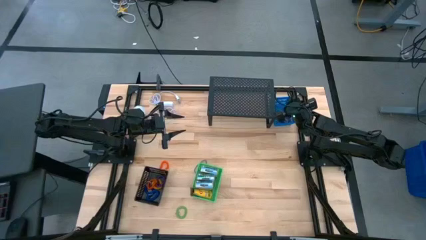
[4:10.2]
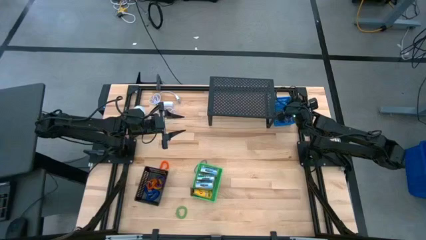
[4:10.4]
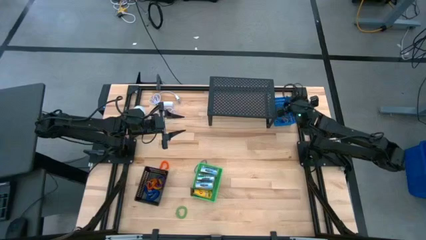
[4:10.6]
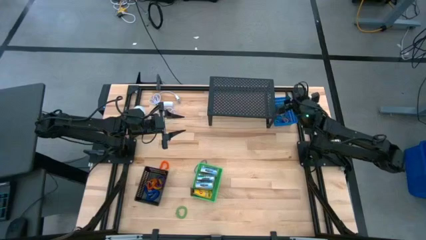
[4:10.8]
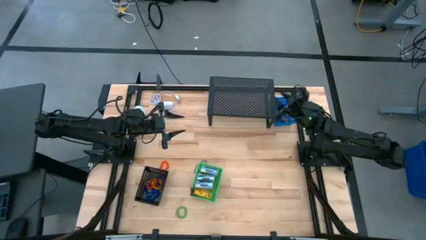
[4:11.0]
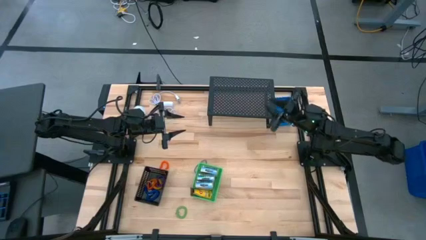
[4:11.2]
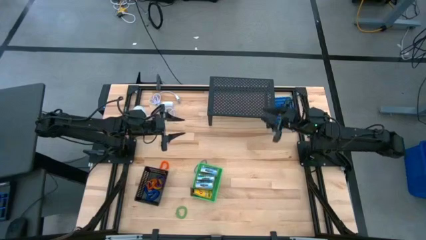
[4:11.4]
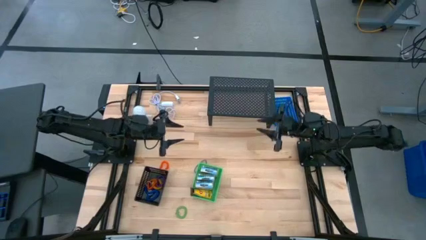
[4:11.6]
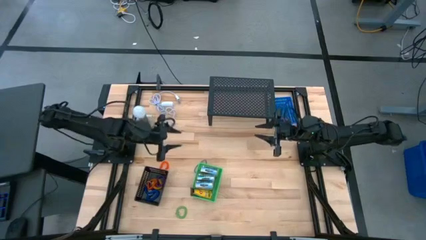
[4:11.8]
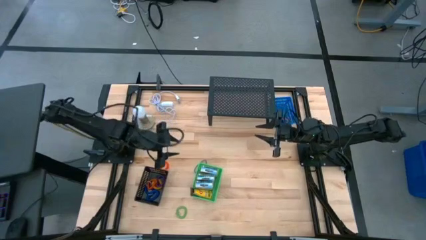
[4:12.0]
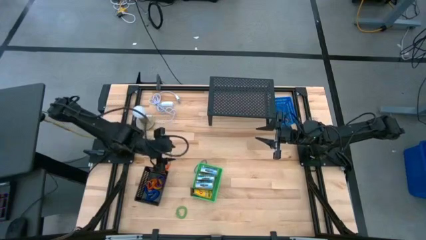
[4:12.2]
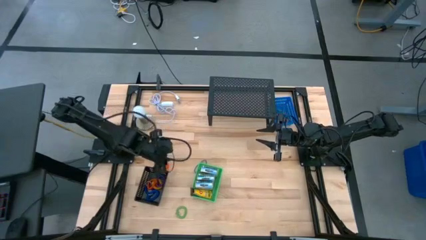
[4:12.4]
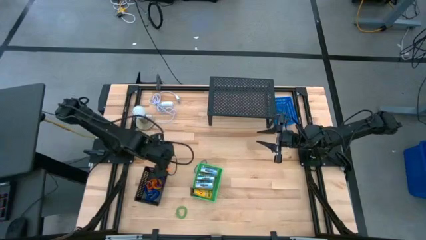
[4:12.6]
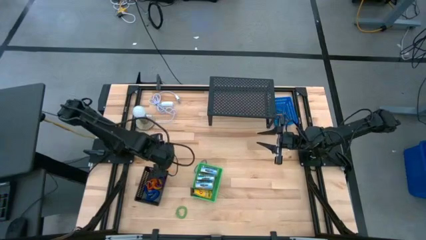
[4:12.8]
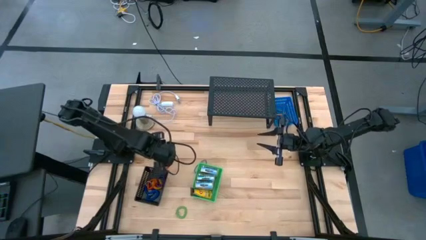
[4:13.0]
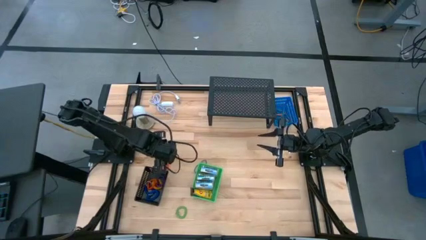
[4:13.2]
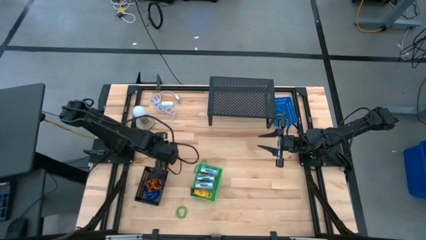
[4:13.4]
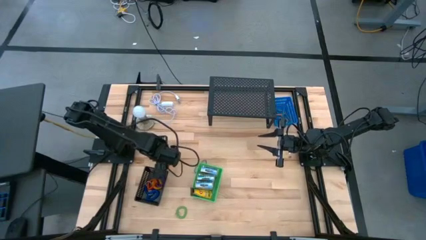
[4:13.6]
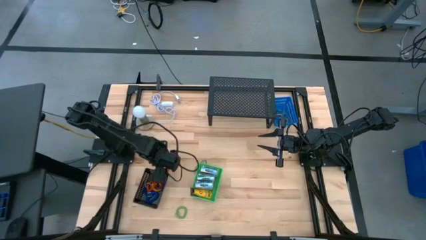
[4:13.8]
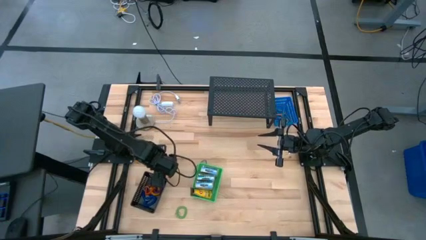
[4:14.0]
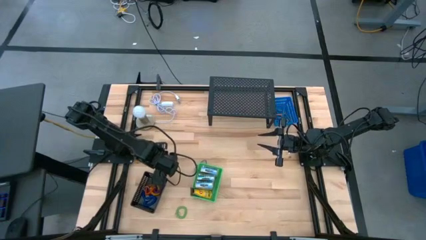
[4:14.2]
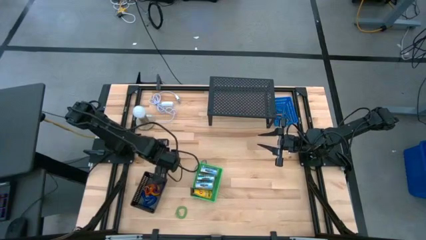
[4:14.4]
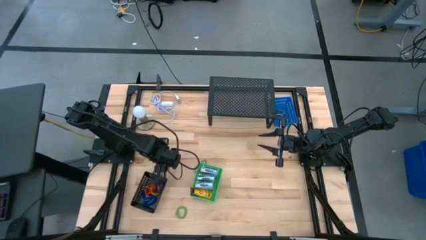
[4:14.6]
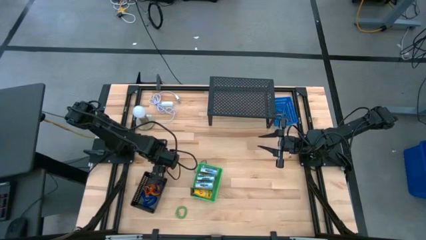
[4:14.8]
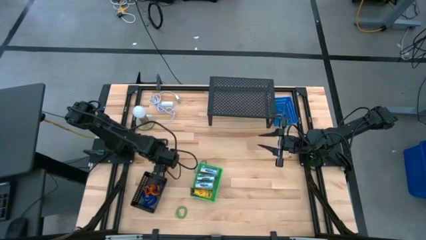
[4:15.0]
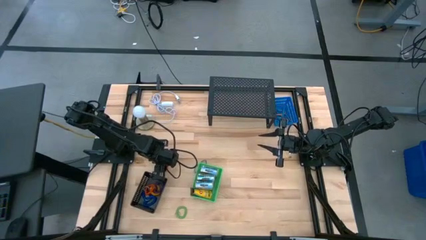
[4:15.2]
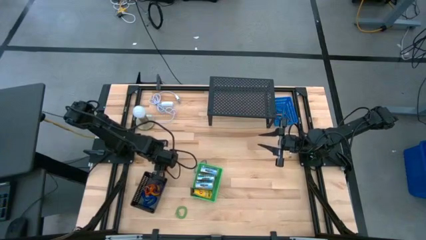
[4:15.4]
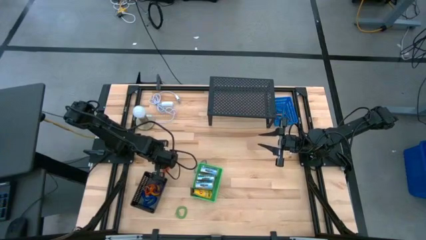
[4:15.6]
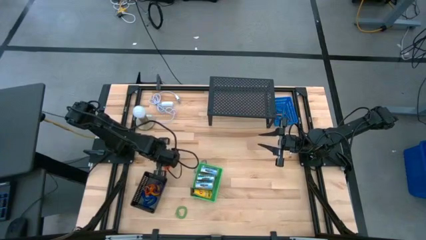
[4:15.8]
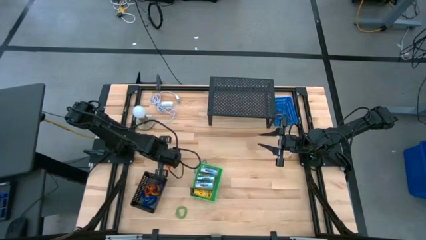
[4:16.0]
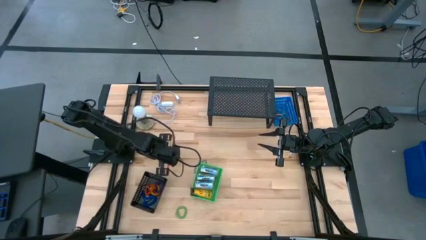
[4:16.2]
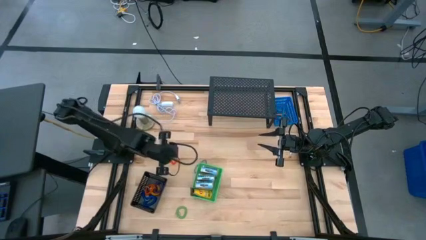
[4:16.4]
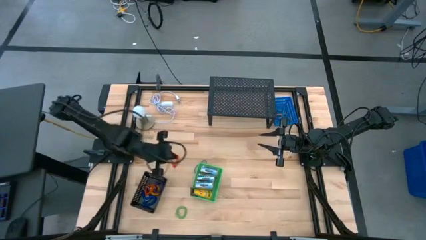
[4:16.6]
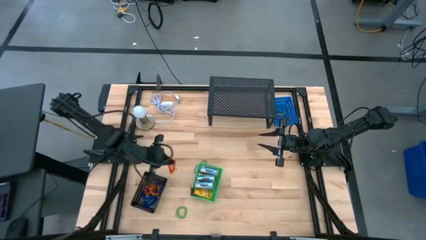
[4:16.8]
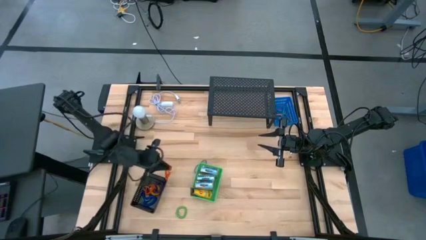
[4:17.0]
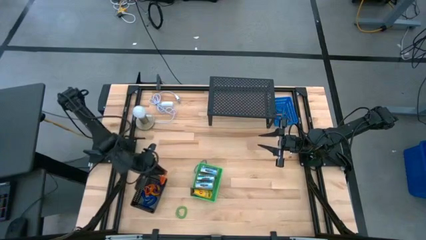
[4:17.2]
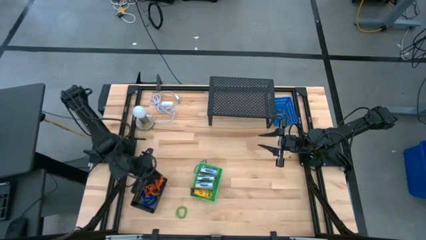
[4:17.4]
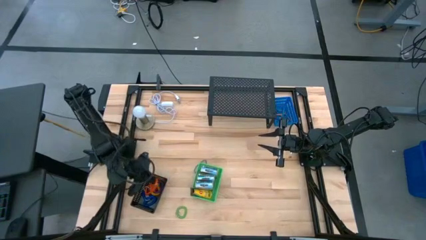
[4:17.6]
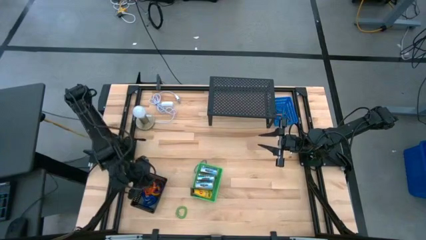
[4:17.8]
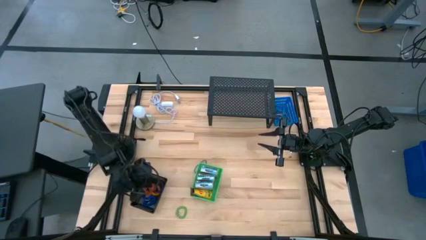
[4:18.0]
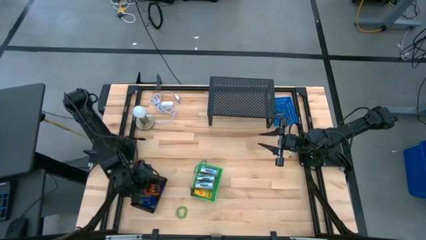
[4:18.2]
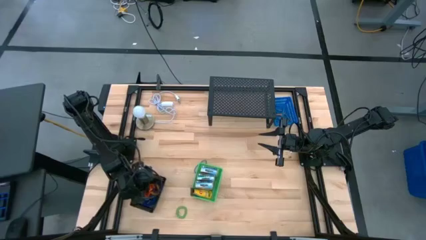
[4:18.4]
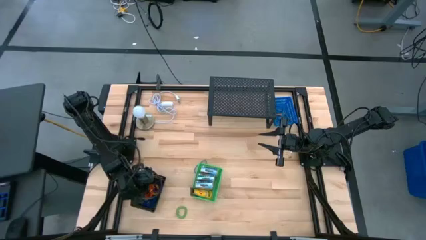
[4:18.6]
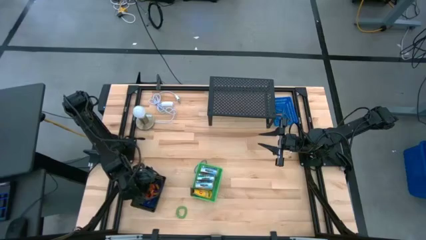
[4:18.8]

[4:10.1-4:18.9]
Task: Pick & Place Office Desk Supplies
Put the orange spring keychain into the black bin

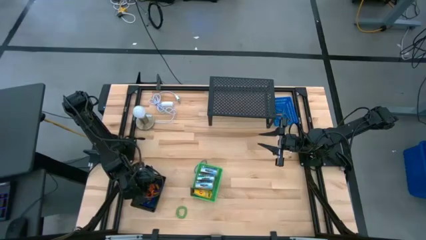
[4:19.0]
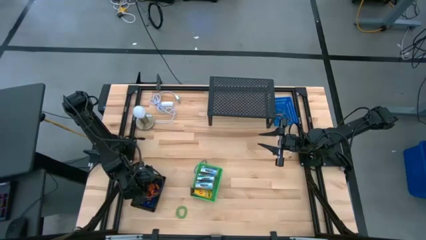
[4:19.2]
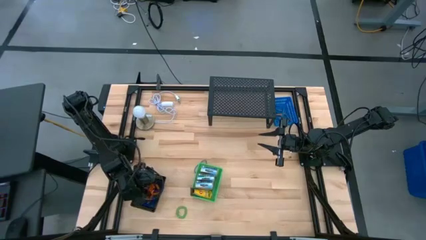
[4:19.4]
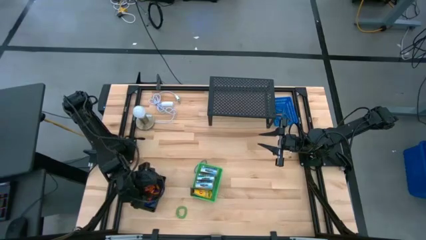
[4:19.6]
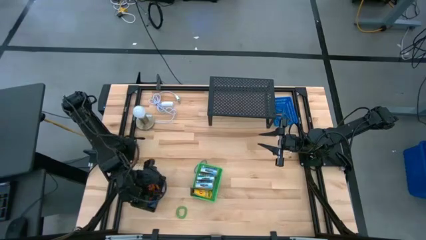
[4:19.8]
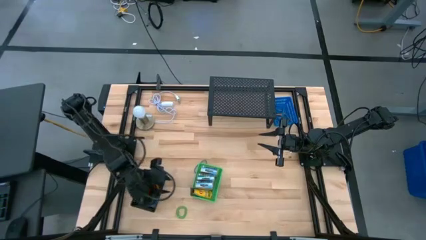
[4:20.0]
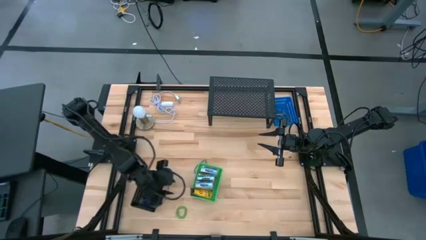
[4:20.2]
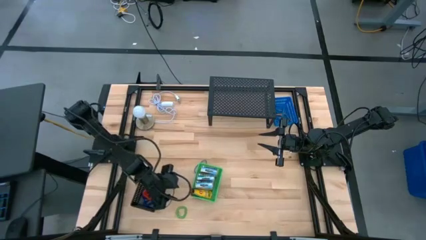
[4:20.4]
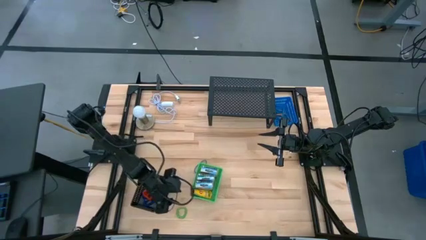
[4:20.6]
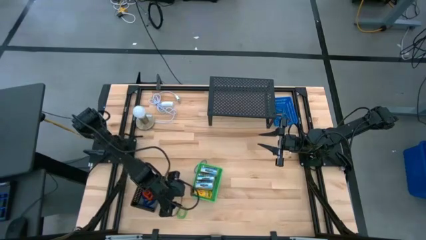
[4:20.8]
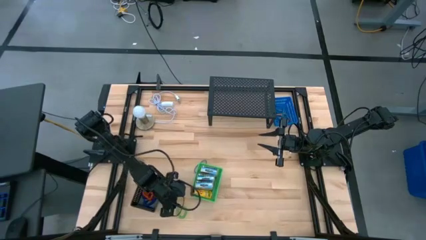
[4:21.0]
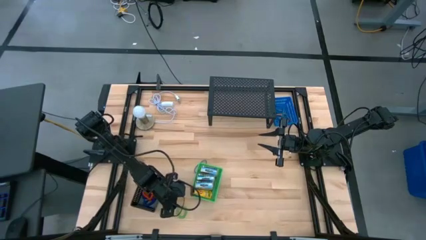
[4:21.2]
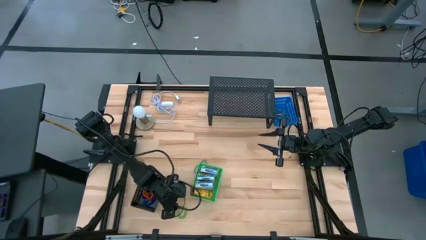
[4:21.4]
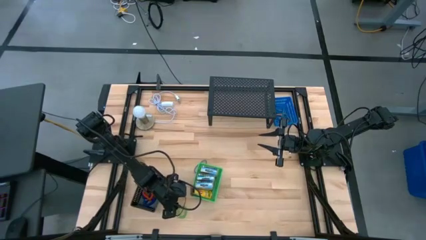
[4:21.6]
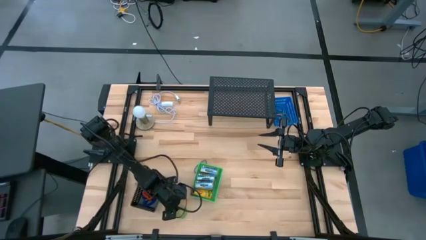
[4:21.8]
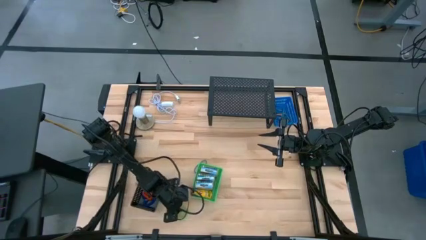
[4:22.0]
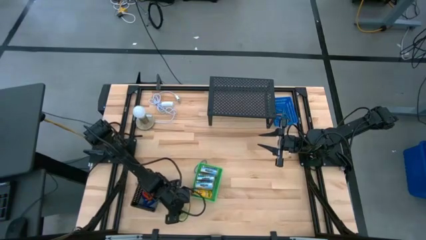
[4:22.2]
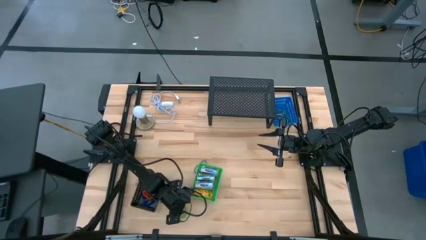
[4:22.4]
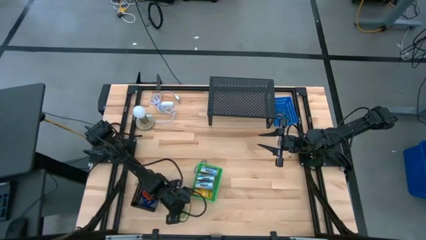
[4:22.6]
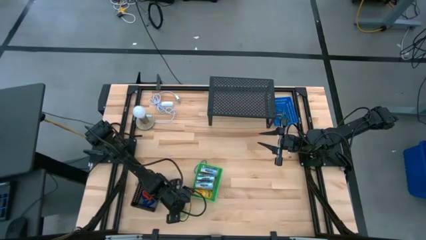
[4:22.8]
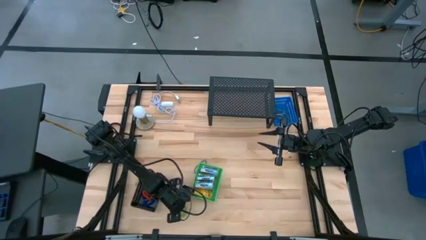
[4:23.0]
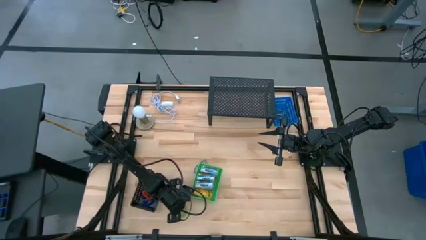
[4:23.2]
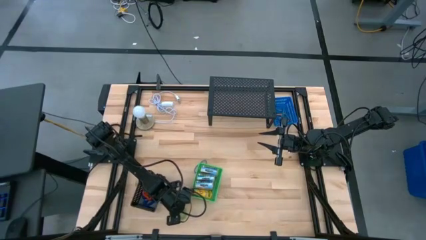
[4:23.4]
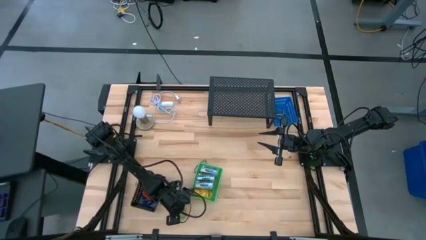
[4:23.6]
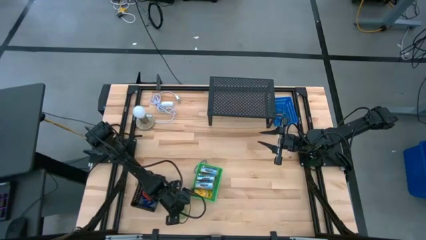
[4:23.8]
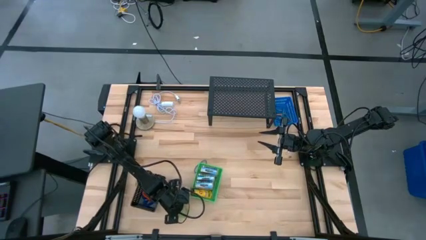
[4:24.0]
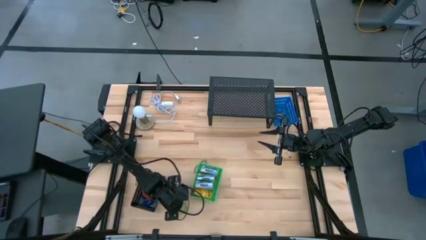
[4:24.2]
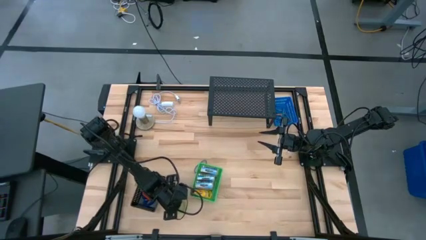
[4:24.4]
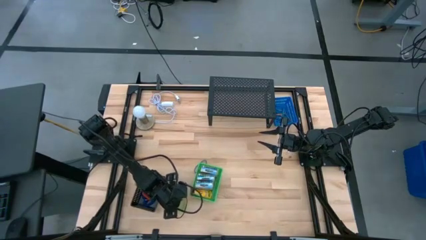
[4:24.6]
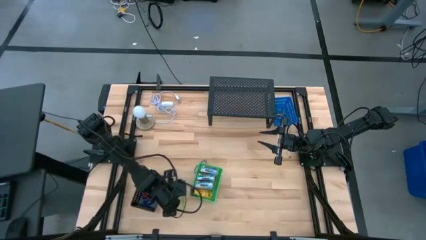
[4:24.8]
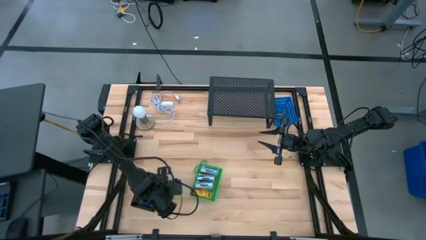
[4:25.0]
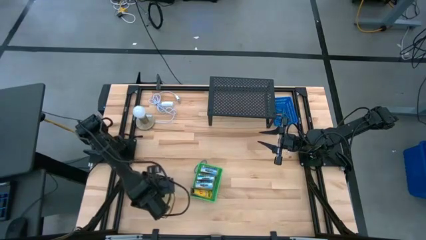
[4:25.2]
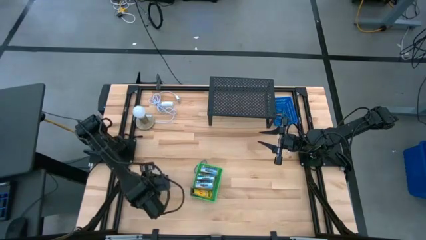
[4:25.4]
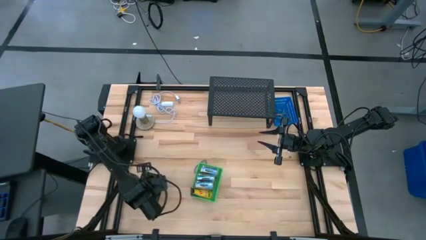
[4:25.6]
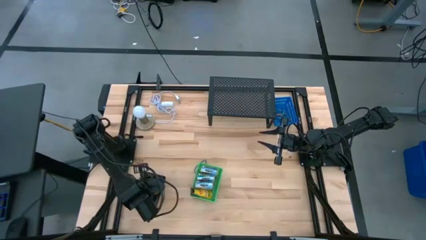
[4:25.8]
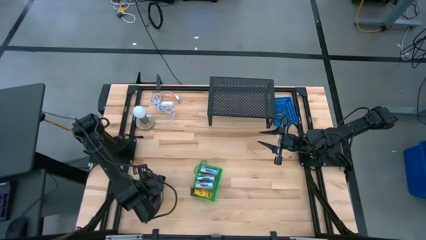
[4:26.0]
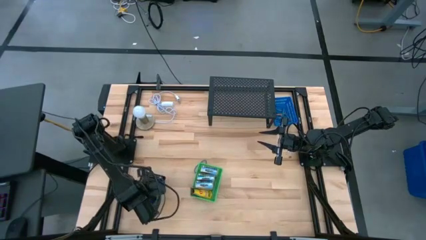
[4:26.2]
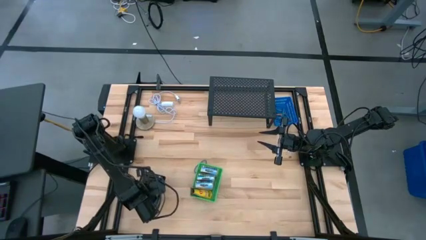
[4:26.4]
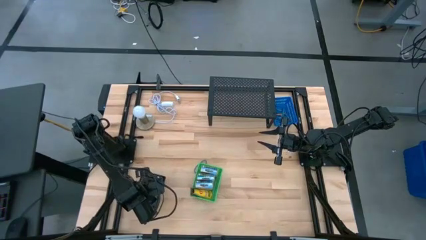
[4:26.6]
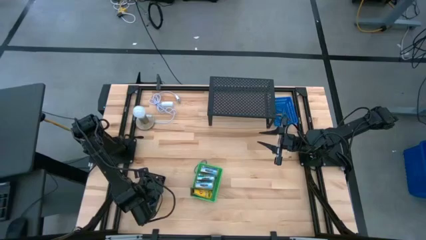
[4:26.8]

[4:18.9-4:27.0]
Put the green spring keychain into the black bin
